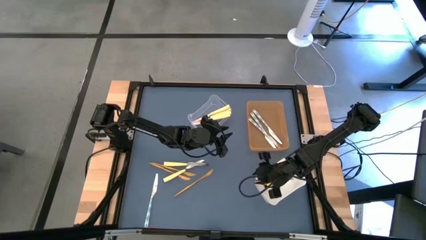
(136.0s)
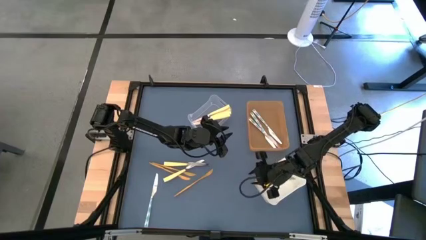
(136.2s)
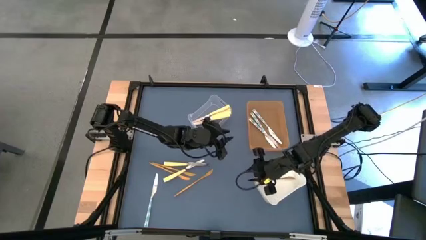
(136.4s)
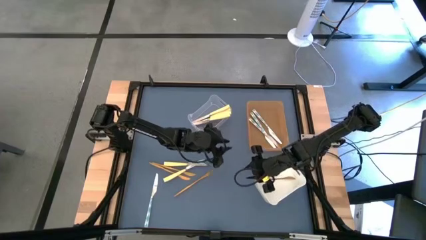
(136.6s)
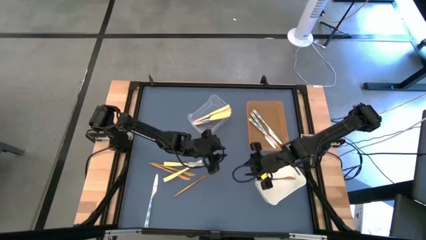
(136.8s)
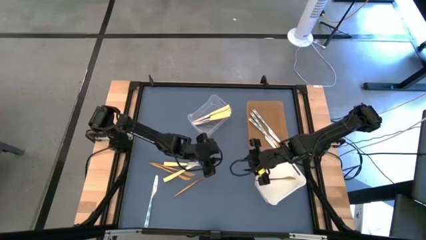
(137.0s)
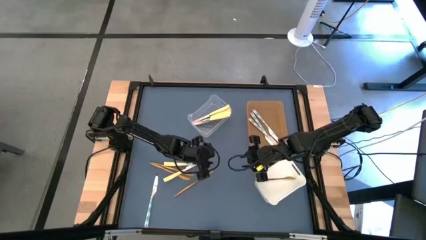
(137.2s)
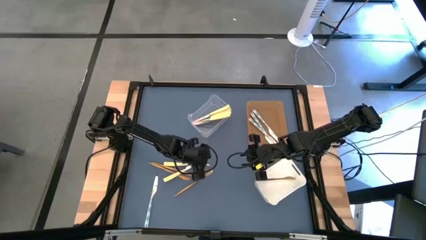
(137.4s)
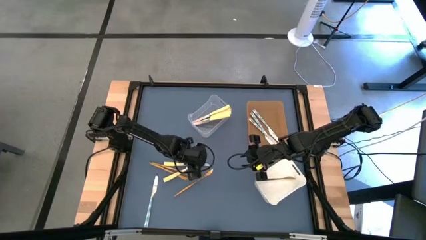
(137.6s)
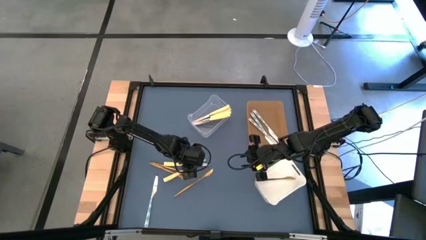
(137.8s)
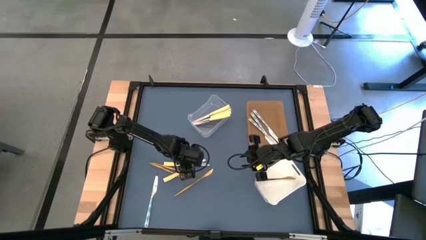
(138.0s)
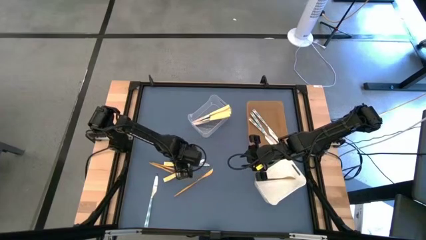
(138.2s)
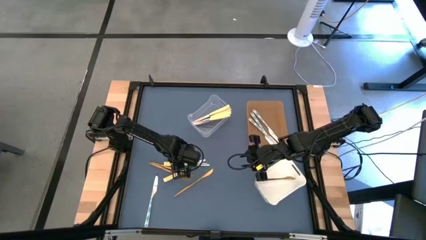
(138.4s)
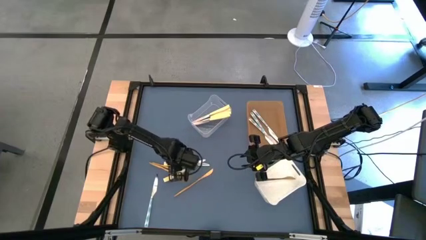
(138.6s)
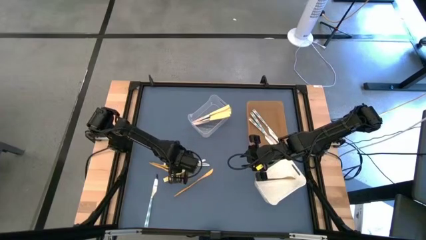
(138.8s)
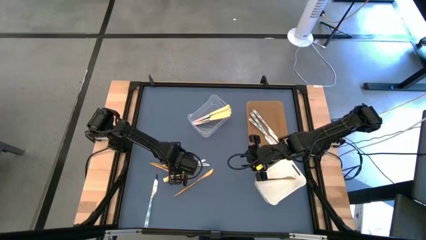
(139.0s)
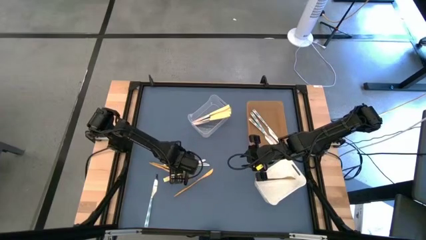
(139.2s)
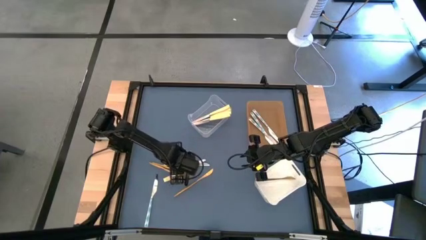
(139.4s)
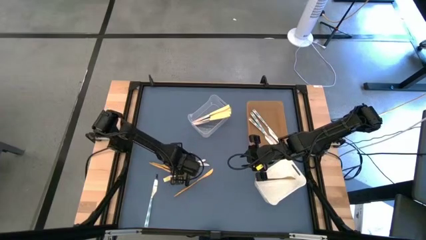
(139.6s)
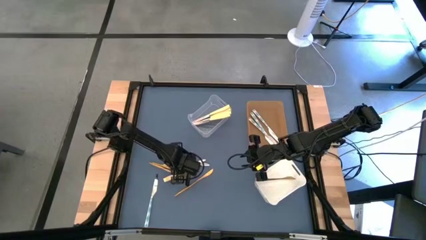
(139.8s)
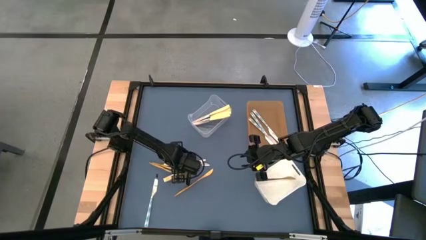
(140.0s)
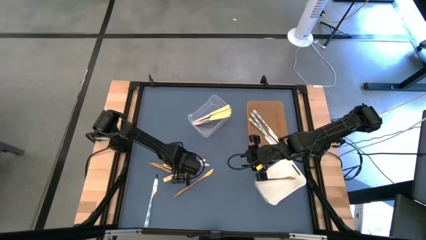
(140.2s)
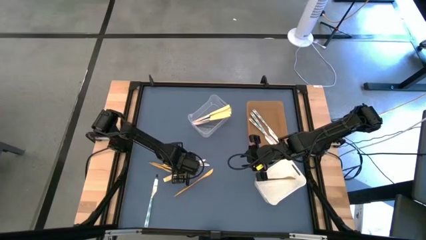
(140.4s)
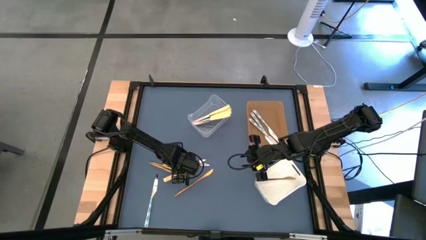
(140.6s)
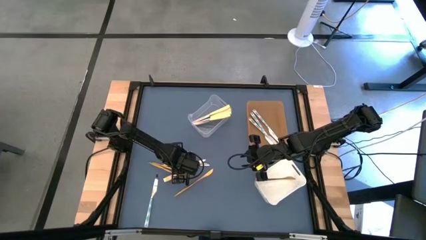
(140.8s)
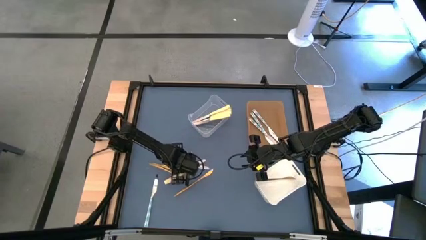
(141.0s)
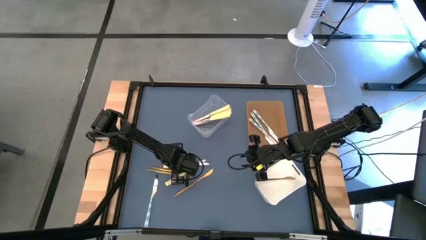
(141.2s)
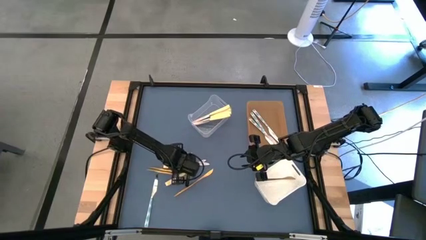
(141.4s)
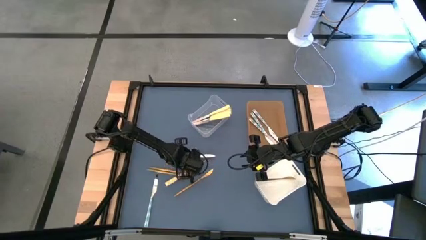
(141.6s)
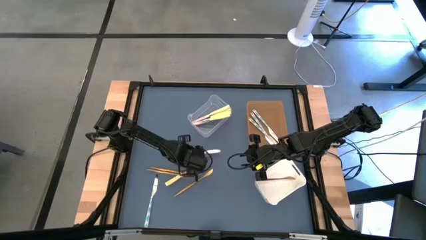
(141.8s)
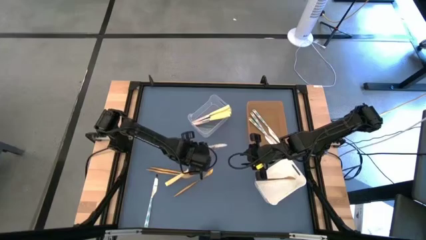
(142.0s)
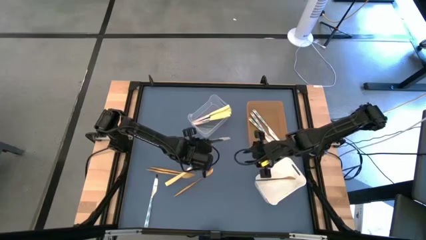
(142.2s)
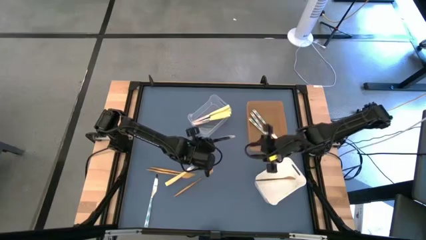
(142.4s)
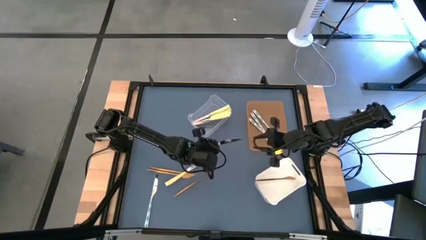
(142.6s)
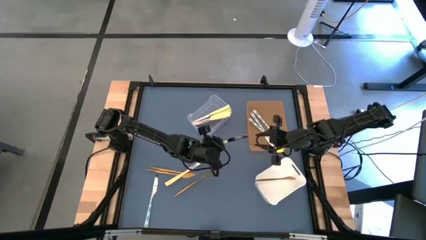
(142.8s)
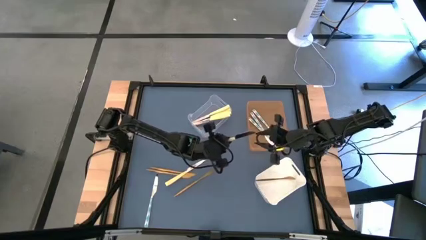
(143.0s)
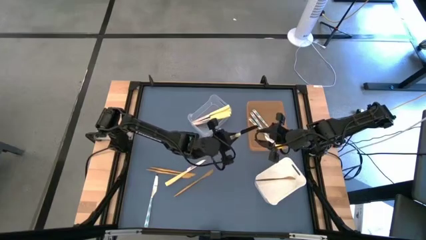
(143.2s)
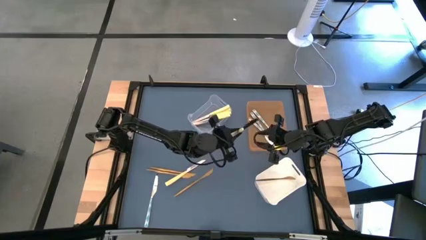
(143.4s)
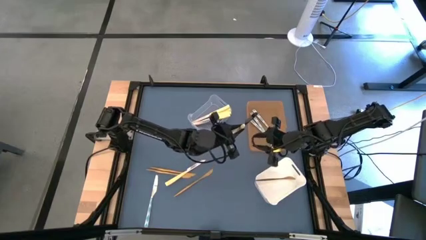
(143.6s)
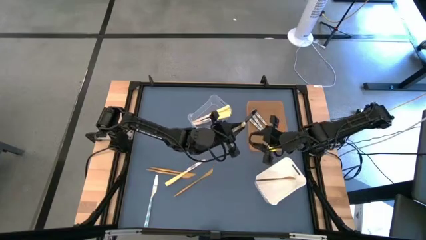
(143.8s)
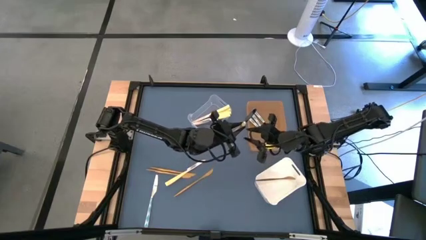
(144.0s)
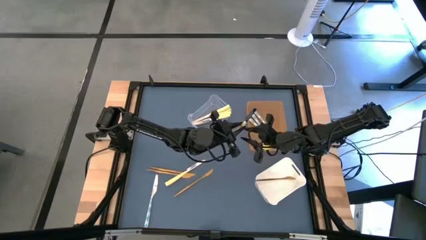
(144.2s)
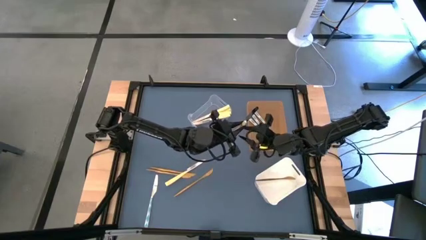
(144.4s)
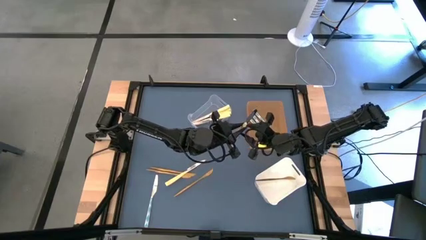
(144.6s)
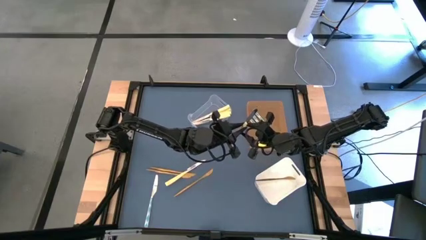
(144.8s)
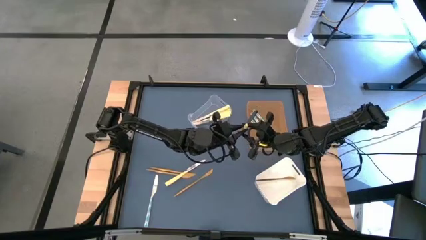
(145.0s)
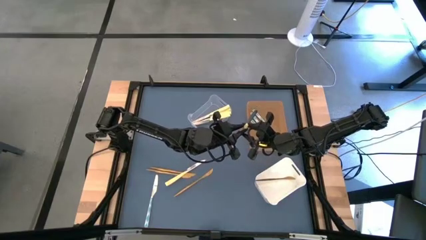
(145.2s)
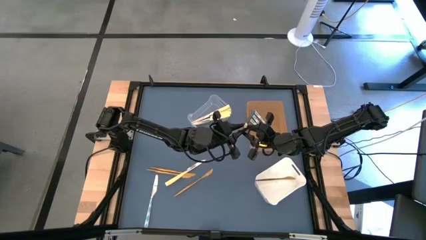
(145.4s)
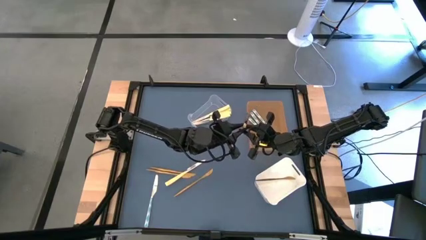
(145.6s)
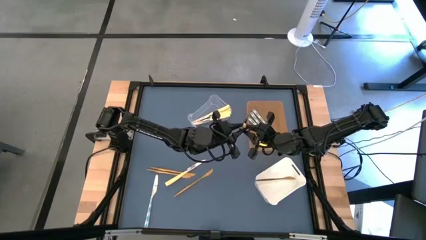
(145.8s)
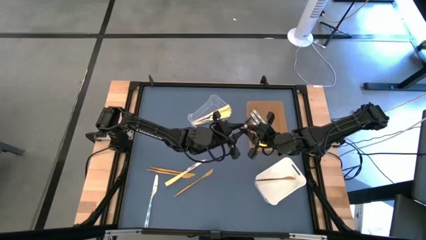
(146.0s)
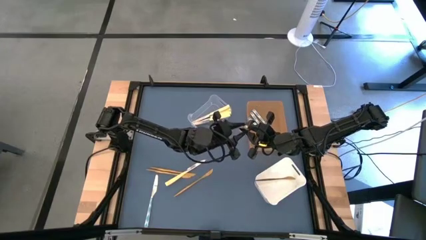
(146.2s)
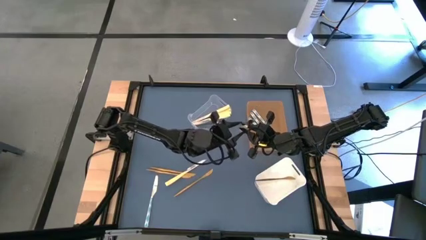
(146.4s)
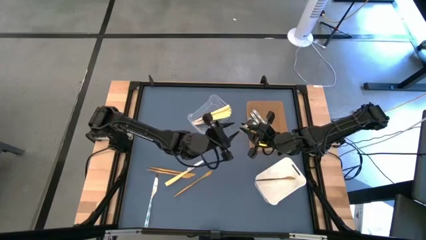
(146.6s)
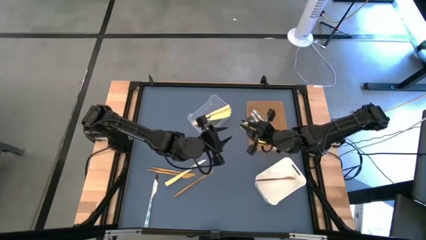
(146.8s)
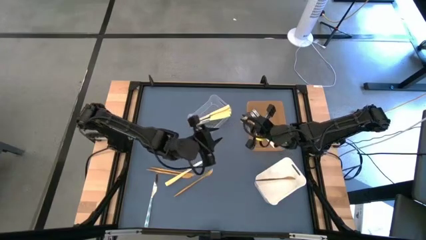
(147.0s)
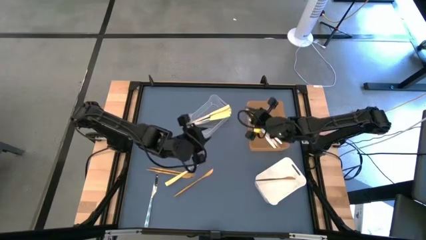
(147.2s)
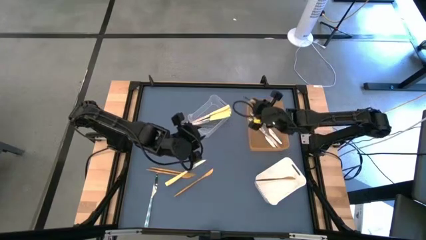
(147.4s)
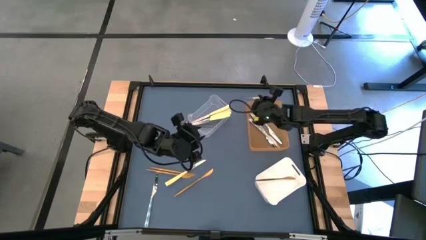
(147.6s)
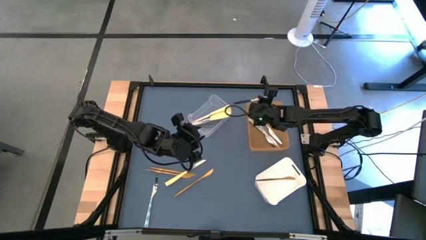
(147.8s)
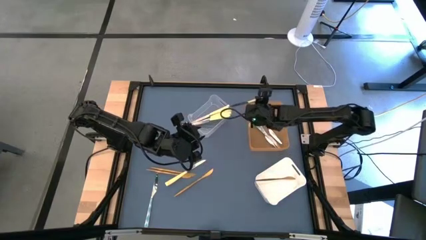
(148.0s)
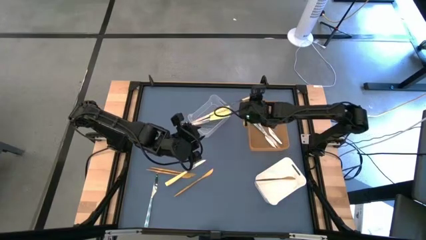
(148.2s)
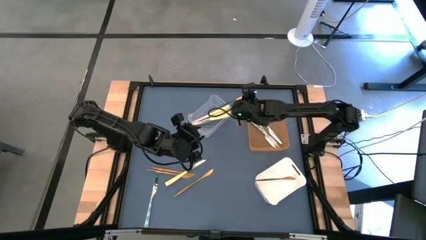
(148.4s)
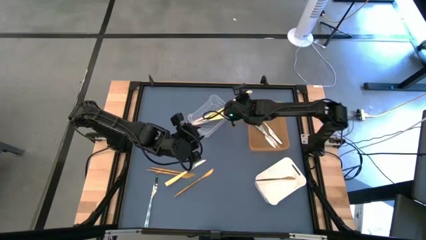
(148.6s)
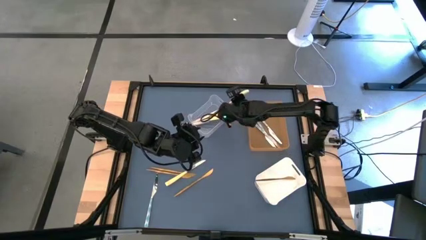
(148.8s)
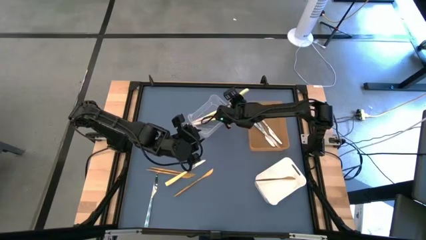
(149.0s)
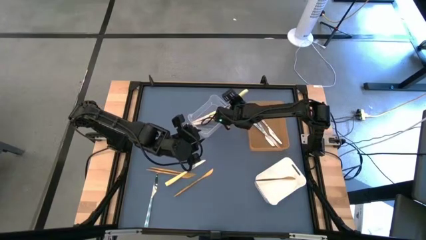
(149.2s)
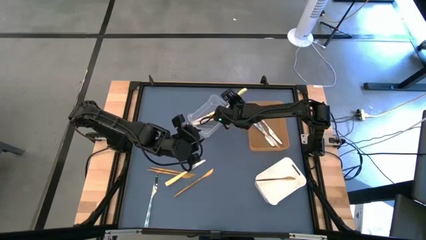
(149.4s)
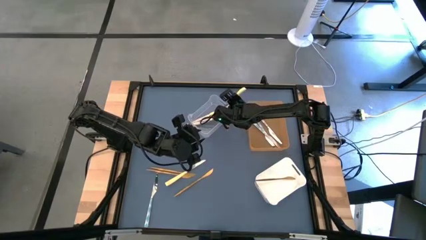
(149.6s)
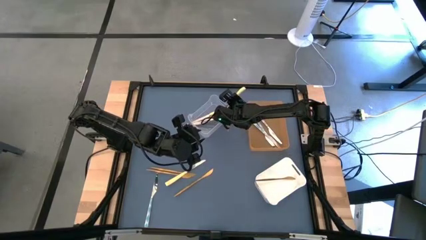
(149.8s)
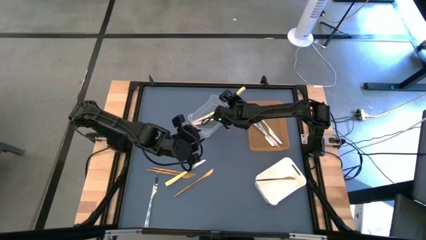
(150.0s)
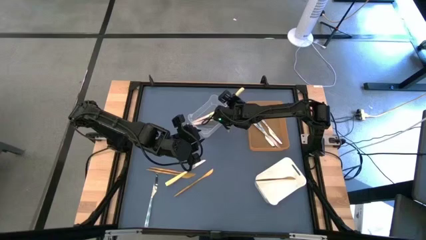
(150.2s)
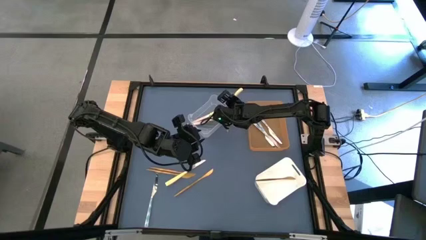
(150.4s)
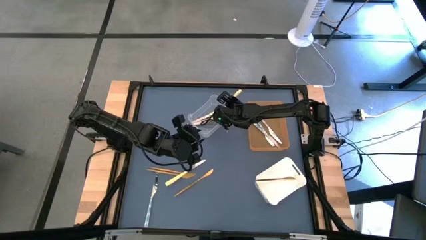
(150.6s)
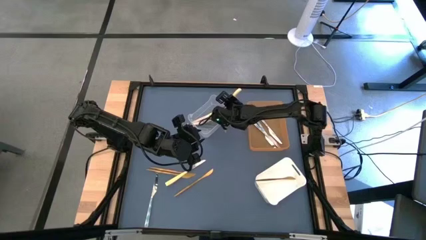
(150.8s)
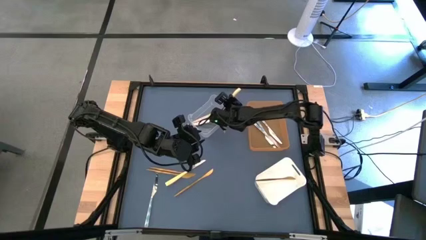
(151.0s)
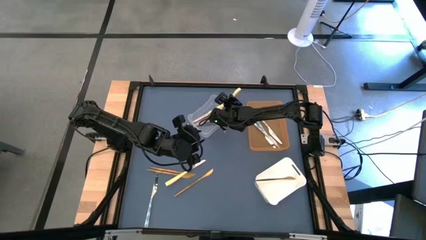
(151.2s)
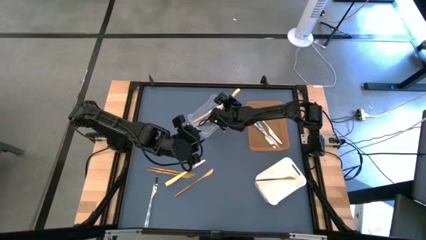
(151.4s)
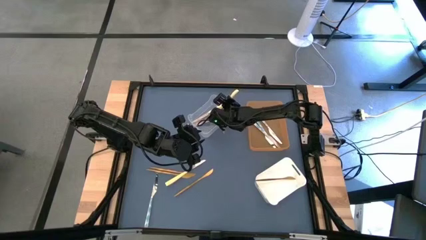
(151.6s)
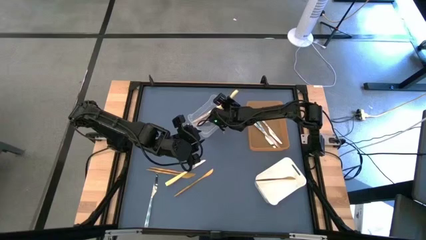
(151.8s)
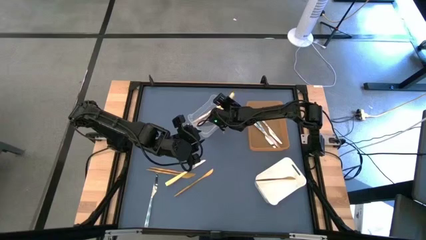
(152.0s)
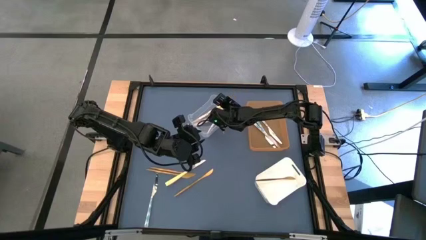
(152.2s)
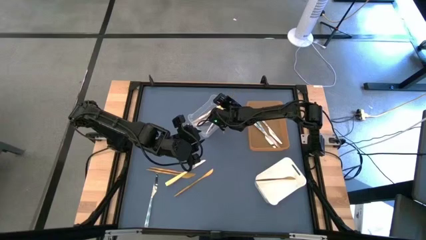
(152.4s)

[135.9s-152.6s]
Task: Sort silverware by color (type)
Put the yellow knife into the transparent bin
